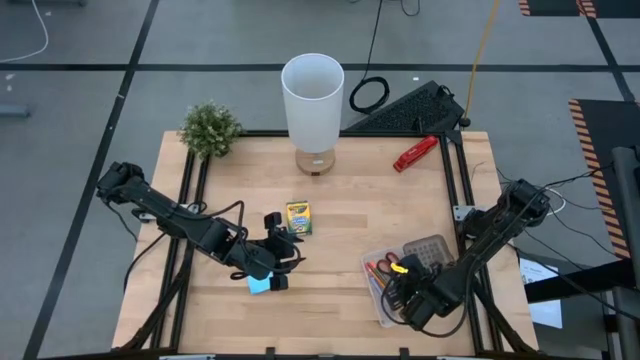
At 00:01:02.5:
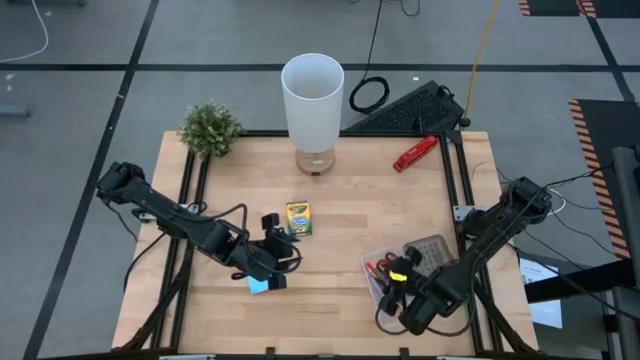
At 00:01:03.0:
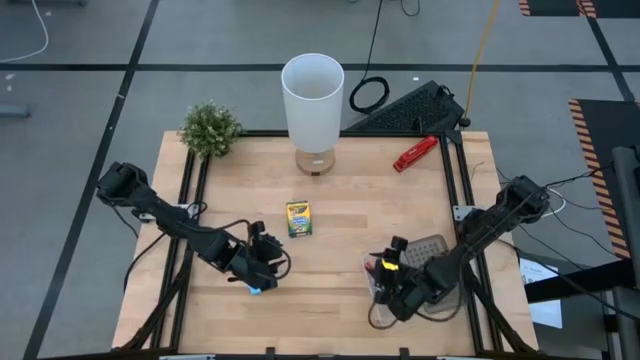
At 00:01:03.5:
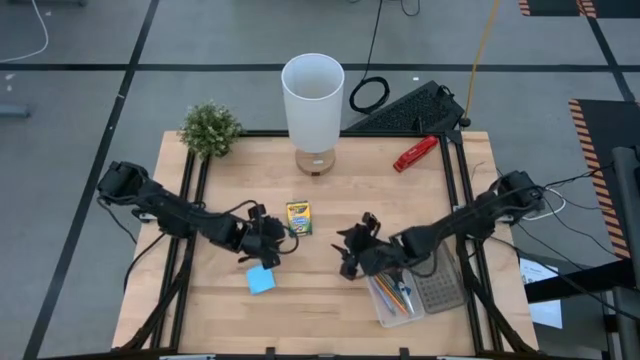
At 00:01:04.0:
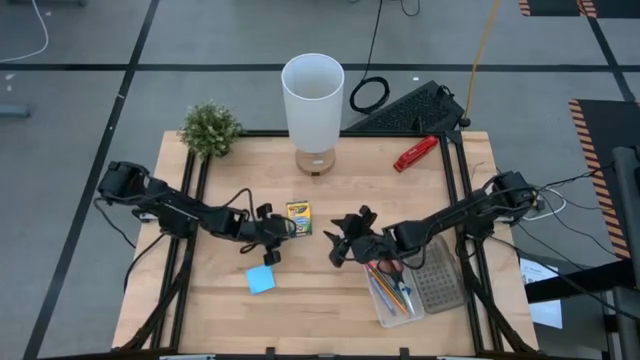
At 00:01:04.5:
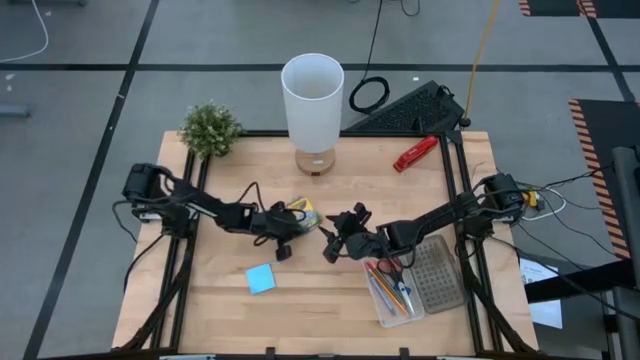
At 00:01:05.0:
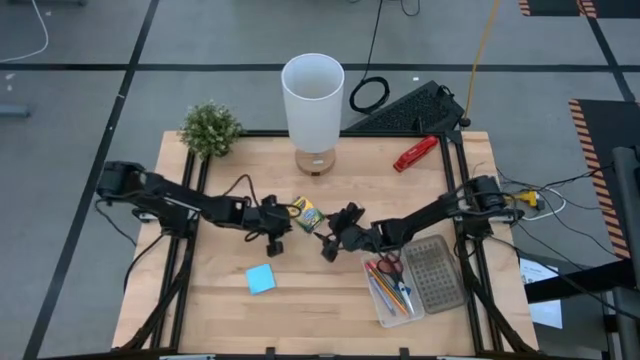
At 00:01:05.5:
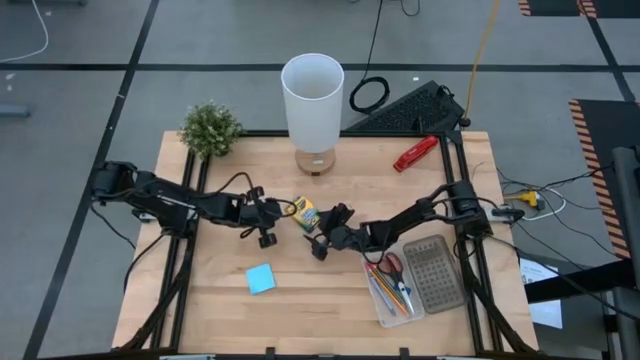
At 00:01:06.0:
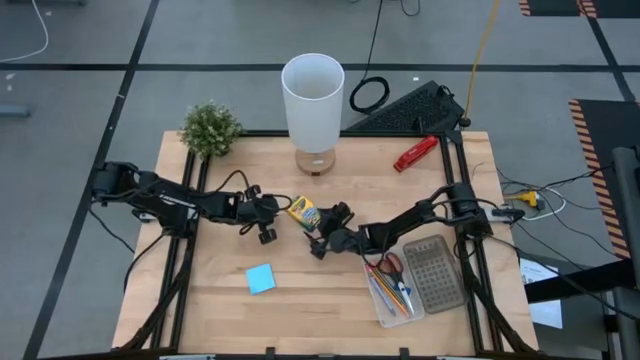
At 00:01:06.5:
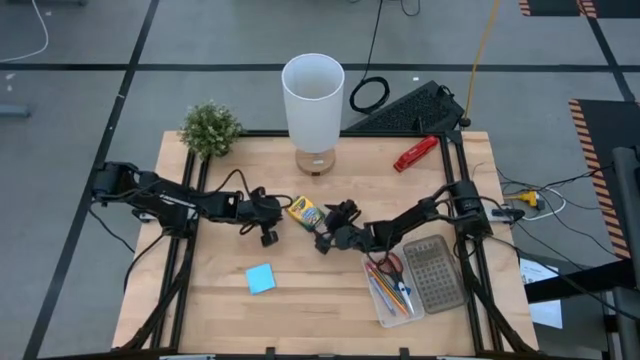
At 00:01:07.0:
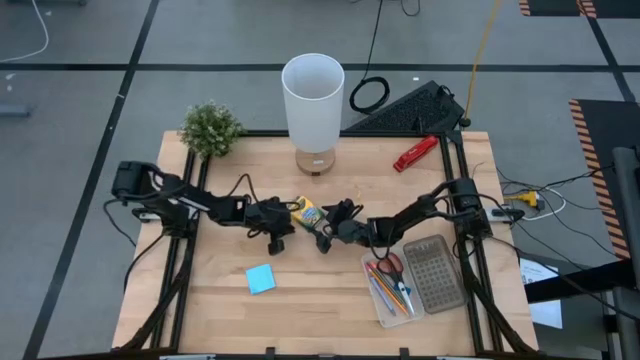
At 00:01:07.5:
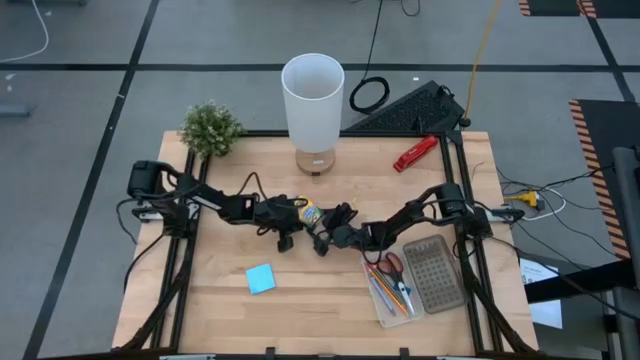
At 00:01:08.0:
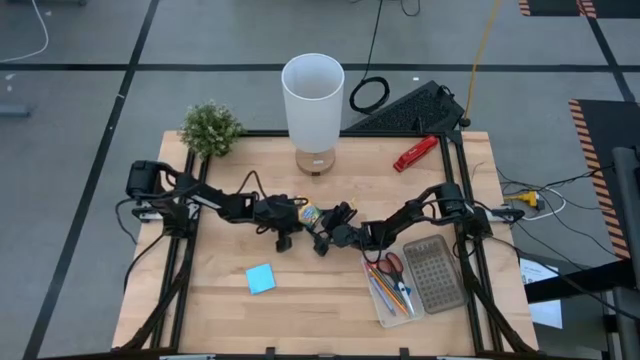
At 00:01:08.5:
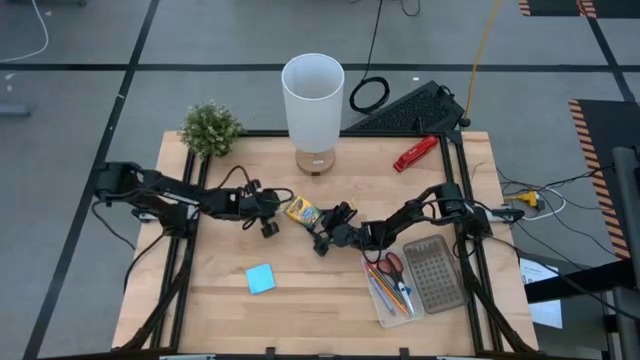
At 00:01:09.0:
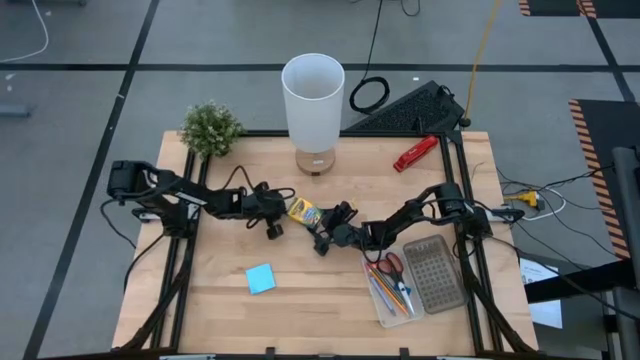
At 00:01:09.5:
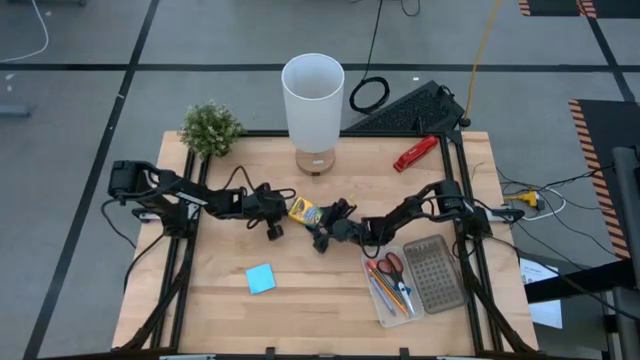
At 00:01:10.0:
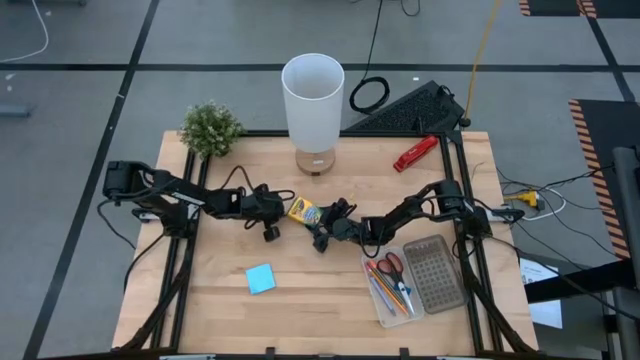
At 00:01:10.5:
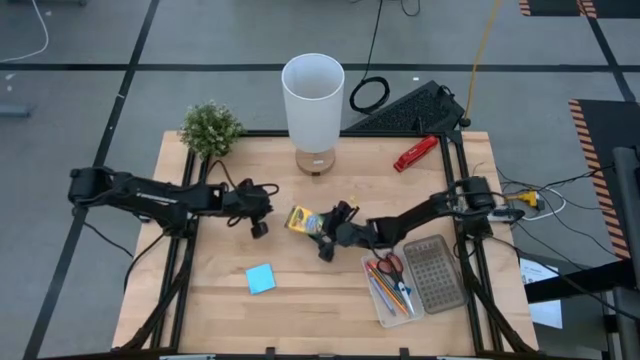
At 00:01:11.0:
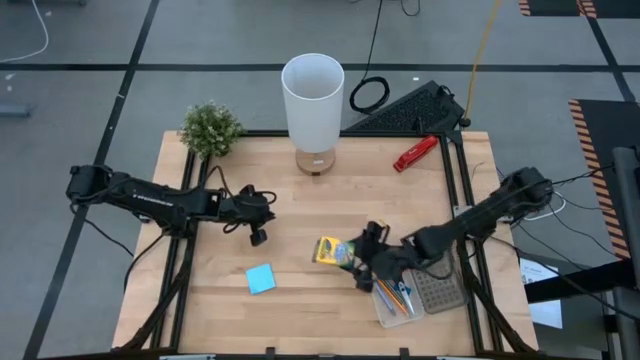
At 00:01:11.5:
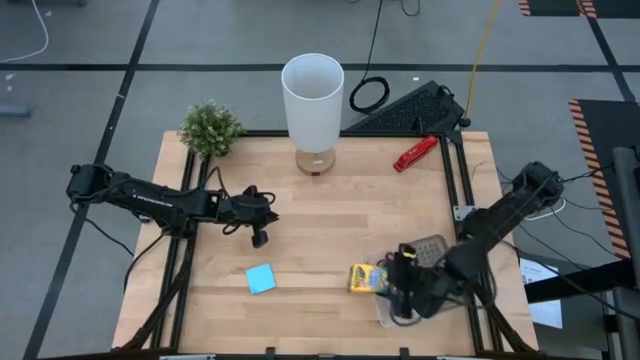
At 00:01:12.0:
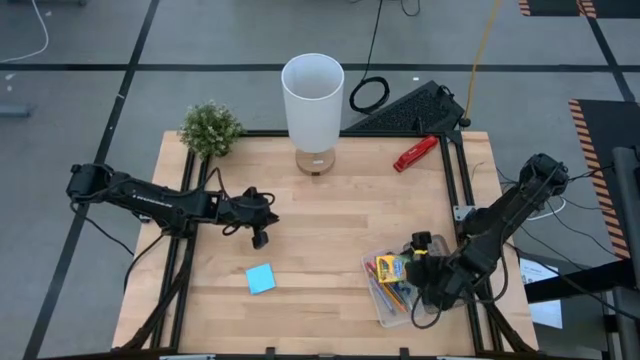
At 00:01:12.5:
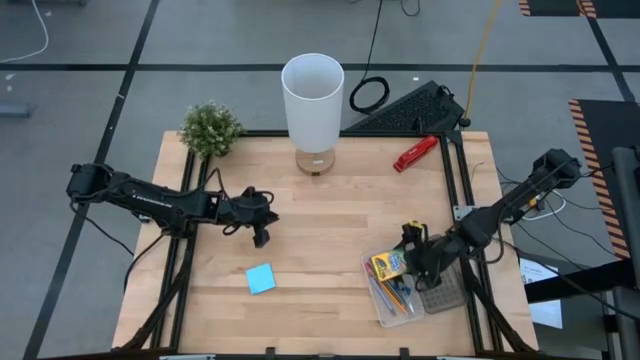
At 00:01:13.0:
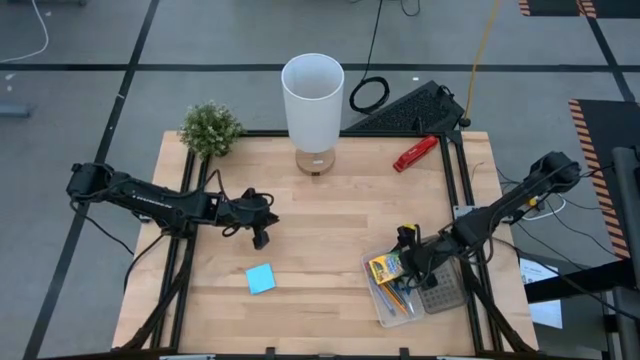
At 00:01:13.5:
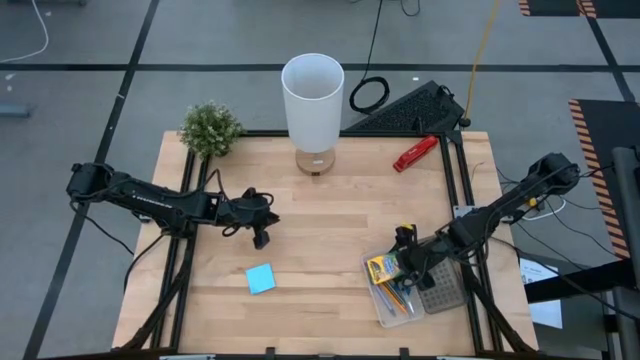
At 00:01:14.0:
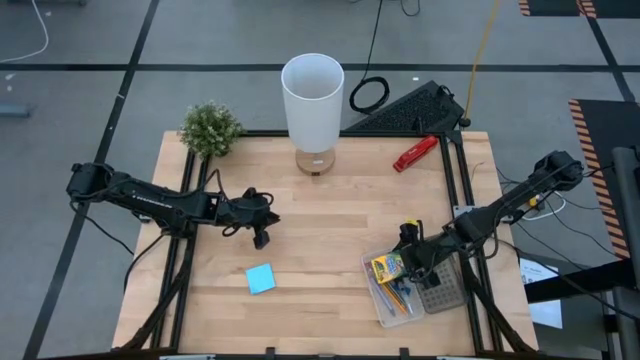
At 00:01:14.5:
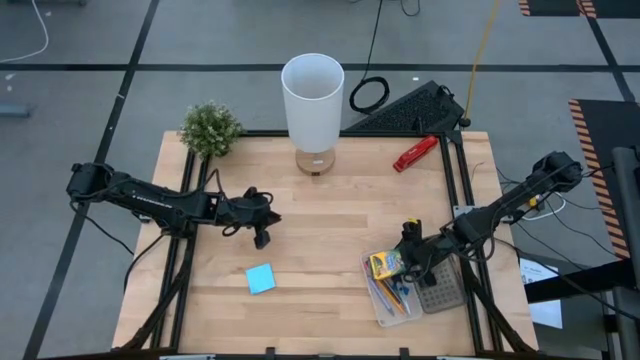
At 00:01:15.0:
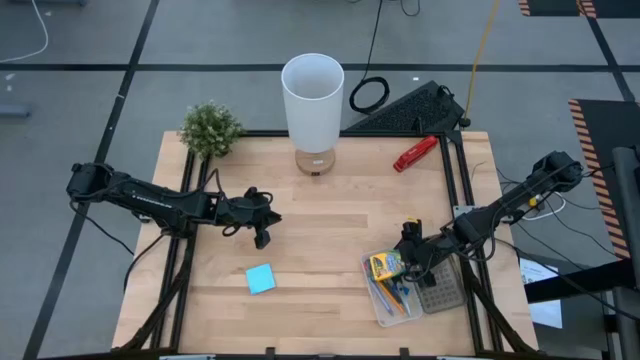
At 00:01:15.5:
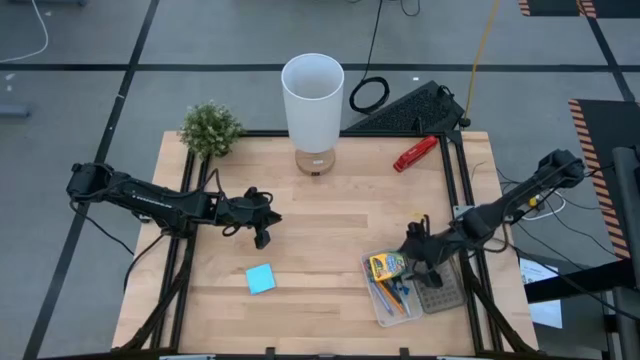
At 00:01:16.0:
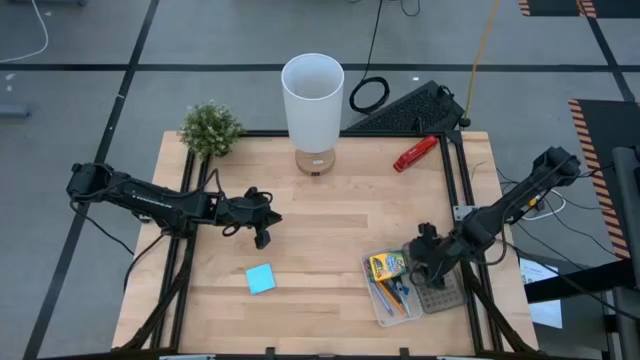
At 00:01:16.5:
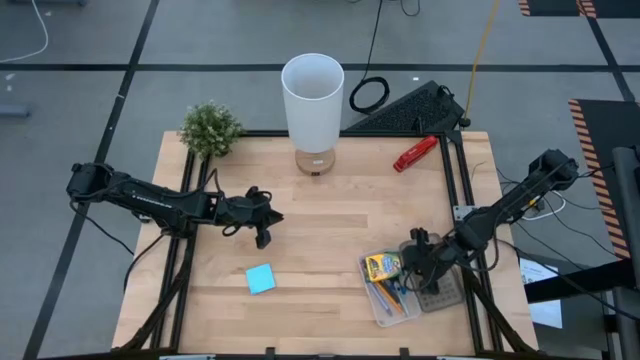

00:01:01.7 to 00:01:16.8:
Task: Pack school essentials
Put the crayon box into the supplies box

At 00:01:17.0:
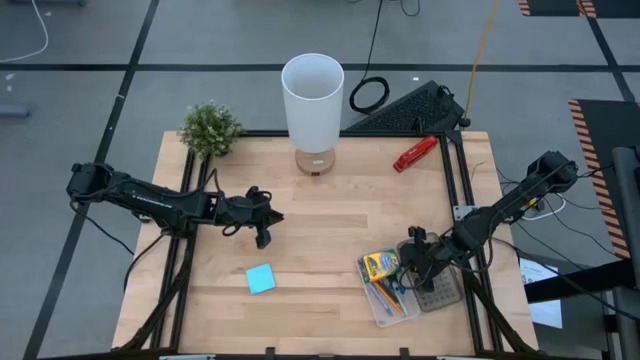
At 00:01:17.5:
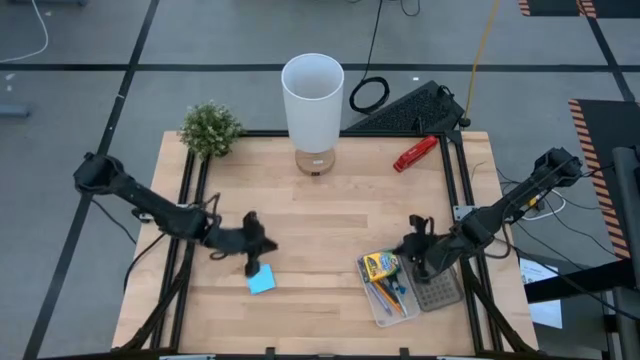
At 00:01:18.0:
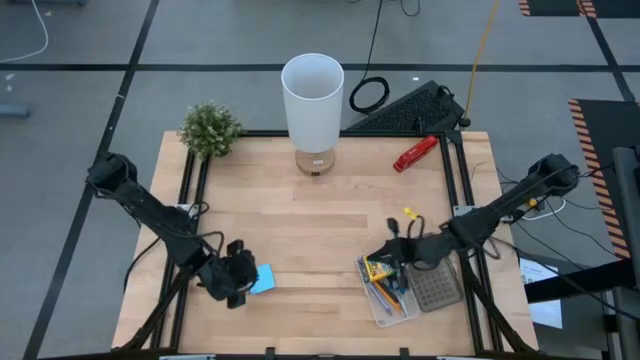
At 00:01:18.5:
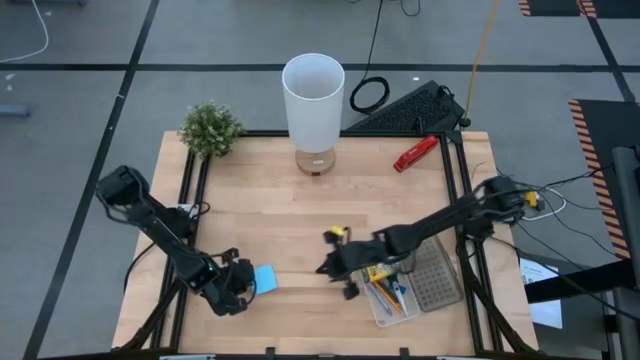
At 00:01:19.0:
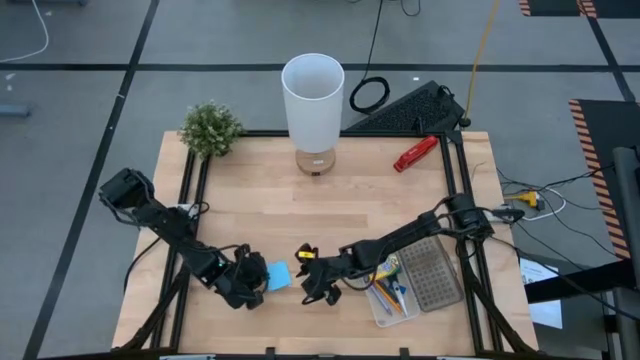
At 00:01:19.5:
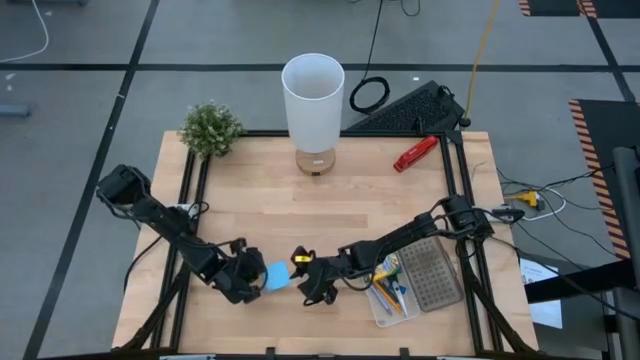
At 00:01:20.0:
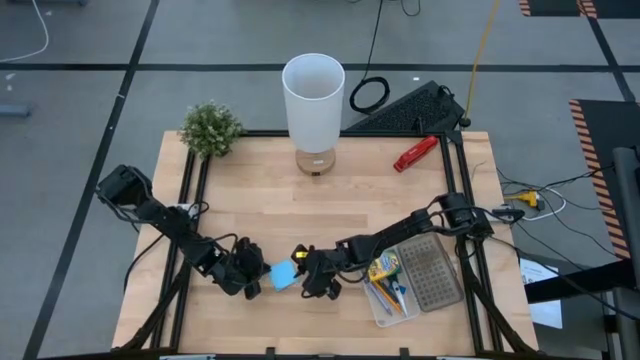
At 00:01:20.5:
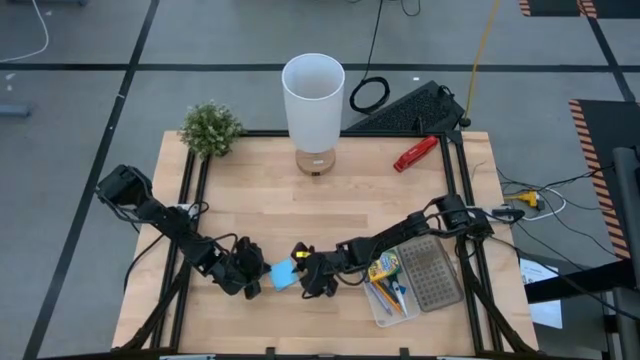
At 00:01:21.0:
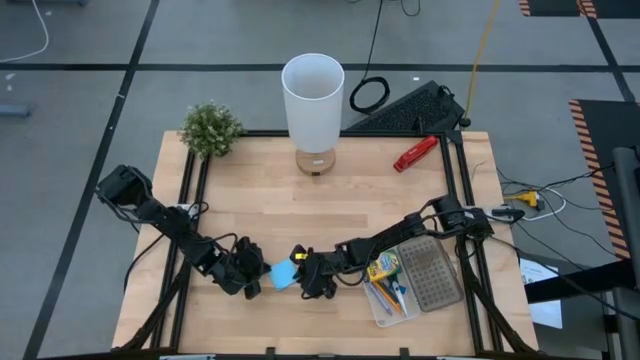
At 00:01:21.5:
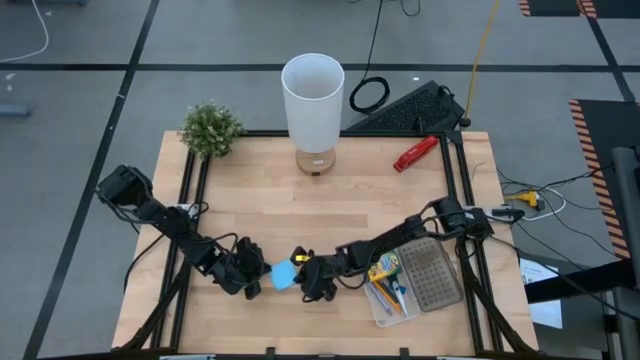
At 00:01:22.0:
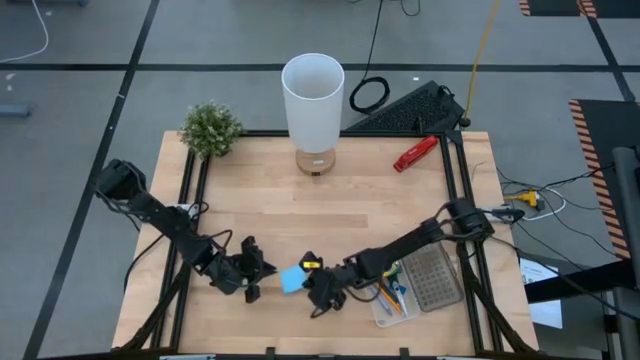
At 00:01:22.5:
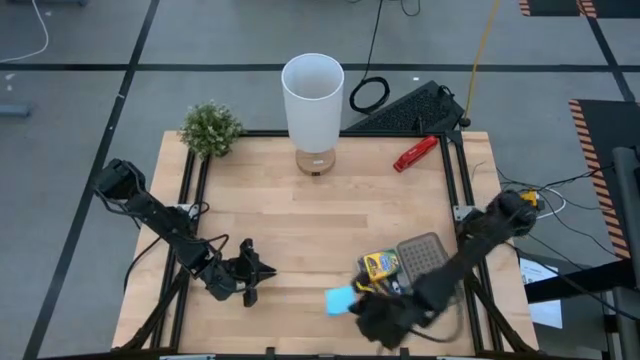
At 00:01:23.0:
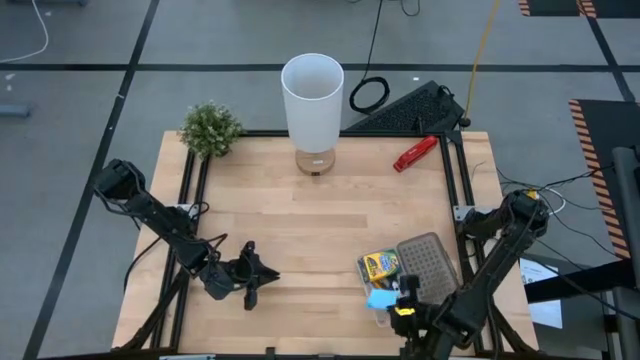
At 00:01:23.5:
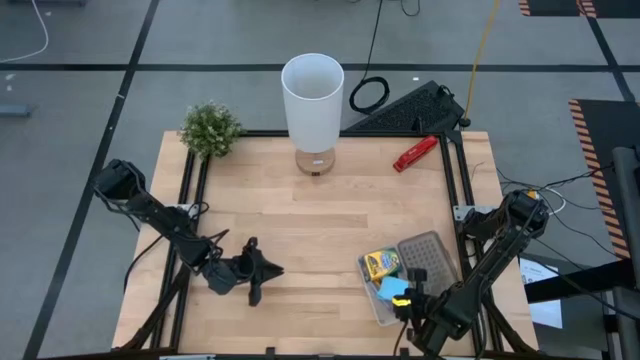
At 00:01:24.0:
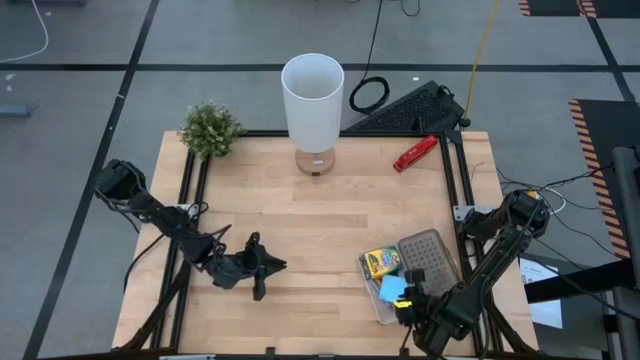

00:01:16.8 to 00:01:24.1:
Put the blue sticky note into the supplies box
